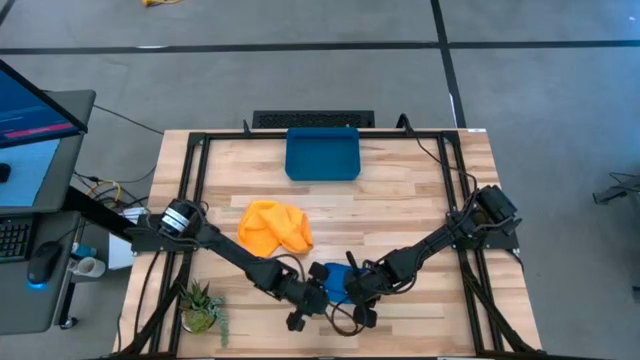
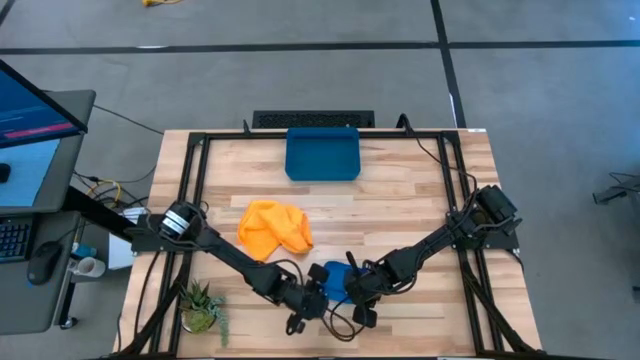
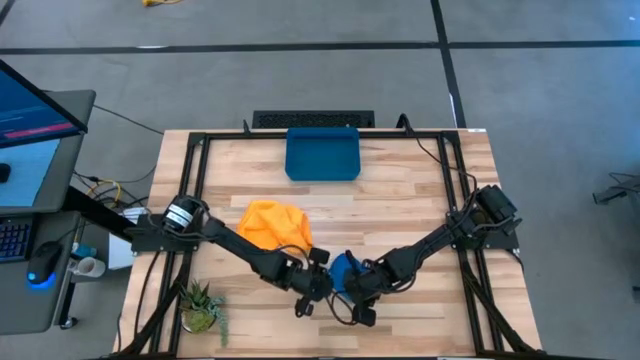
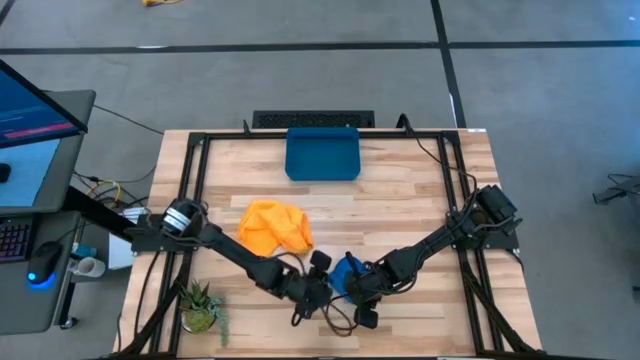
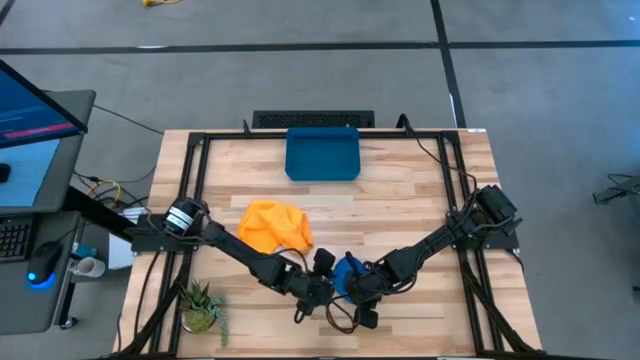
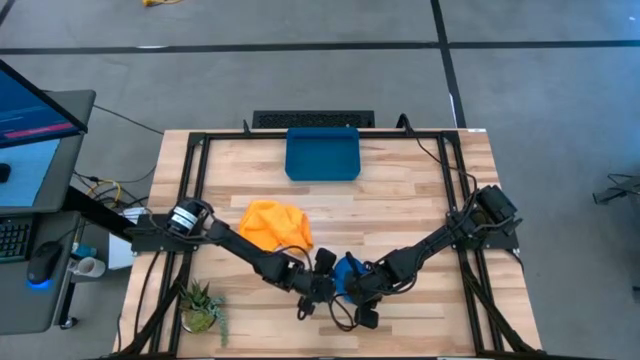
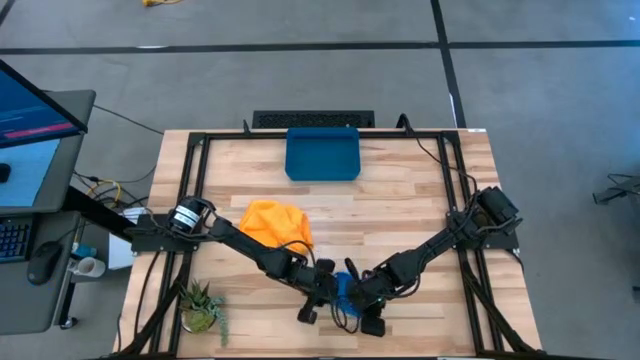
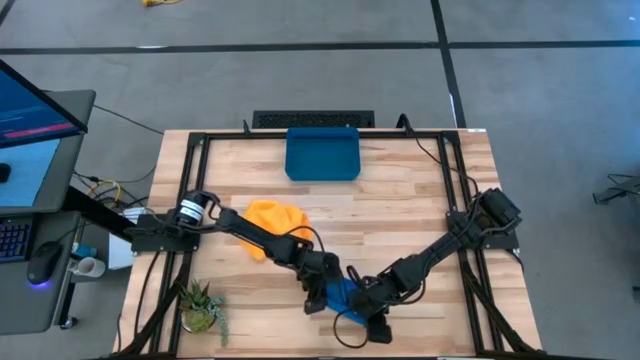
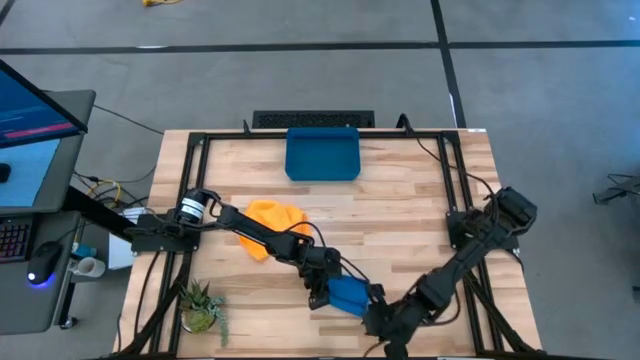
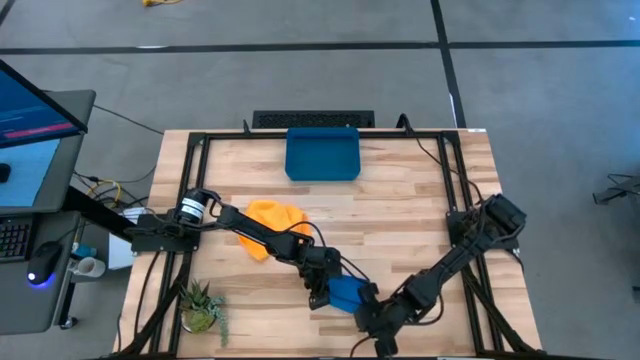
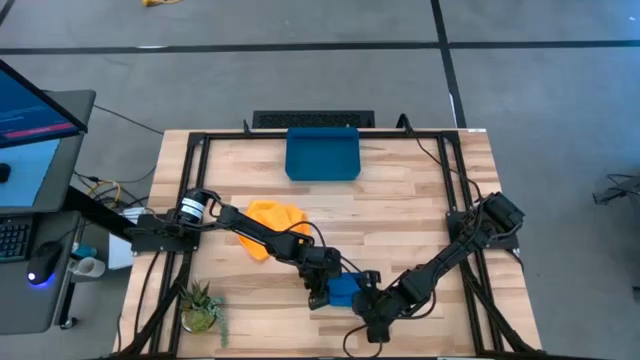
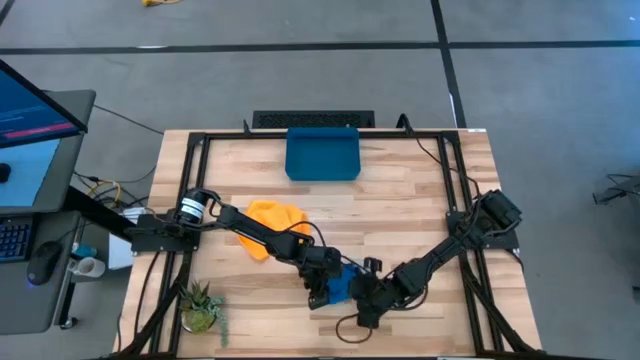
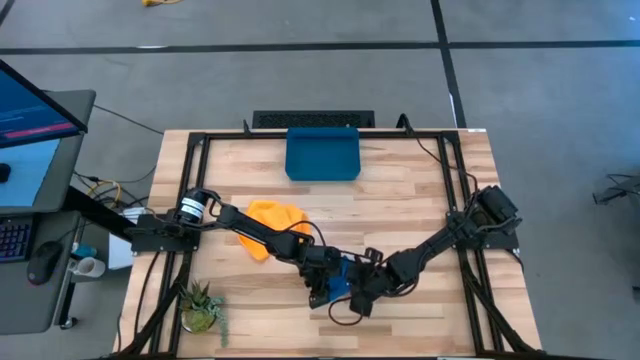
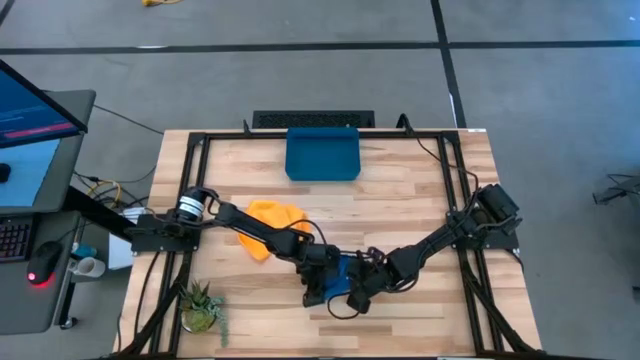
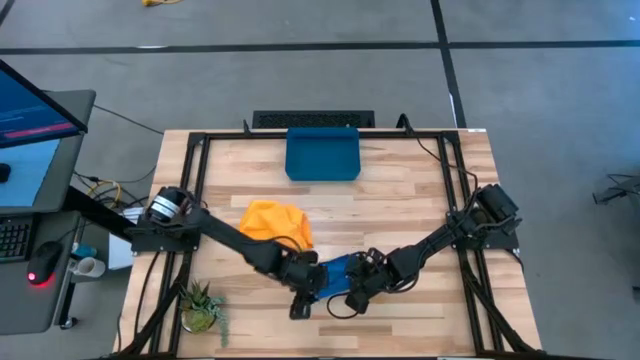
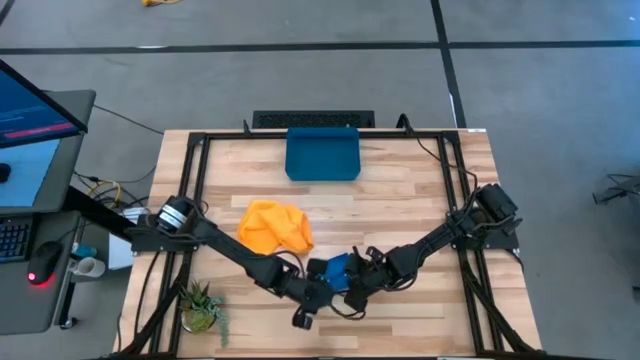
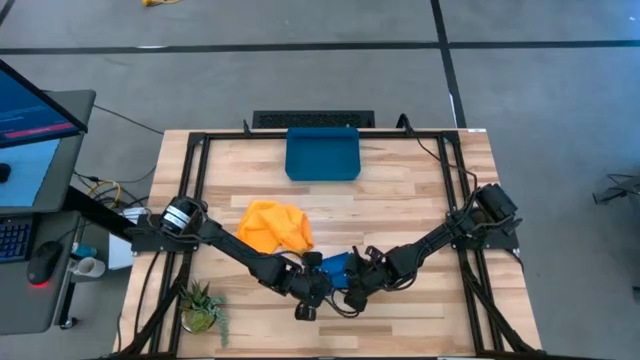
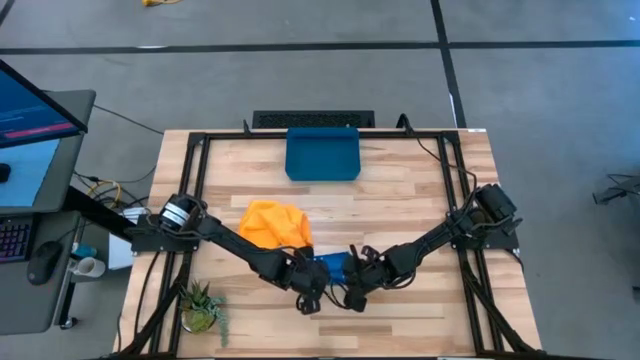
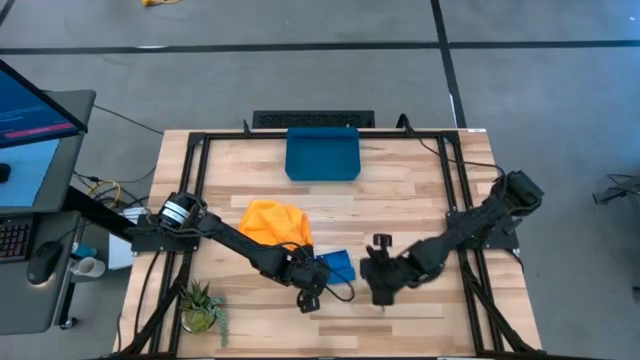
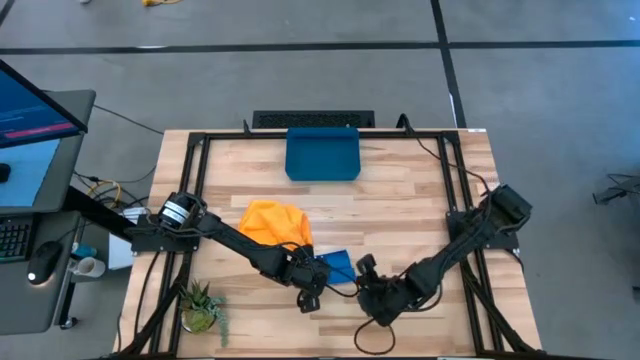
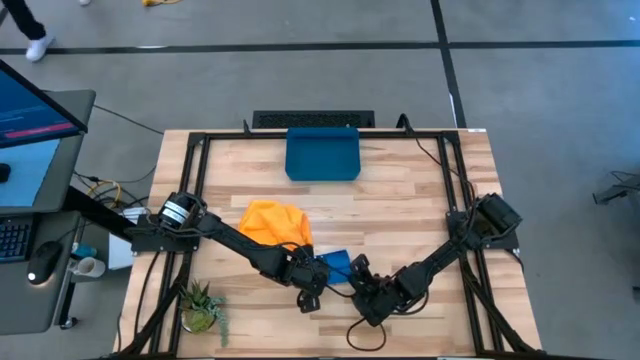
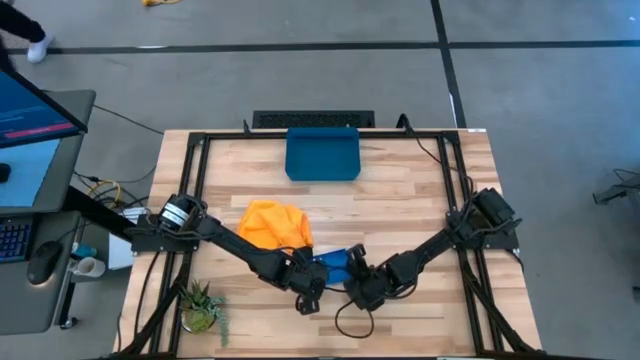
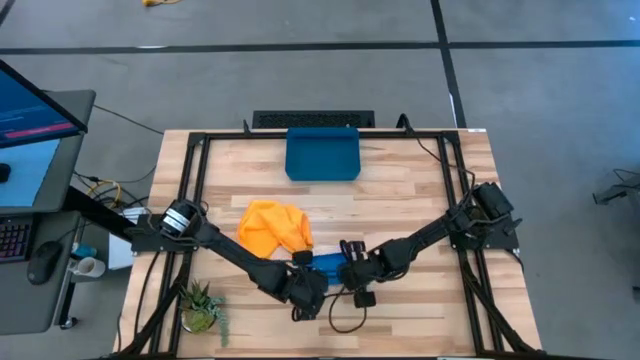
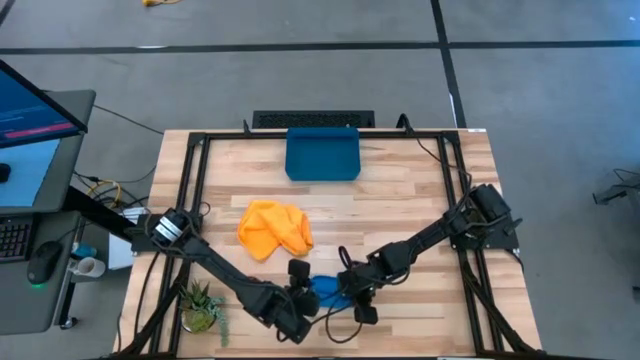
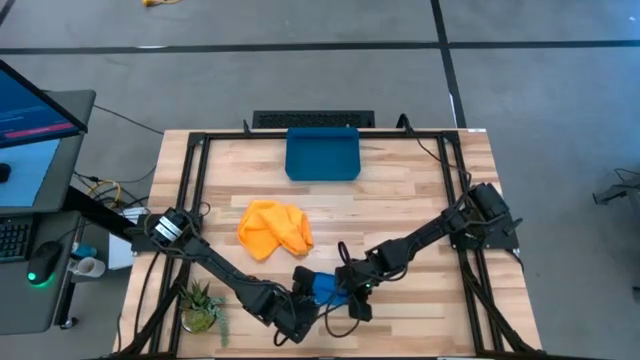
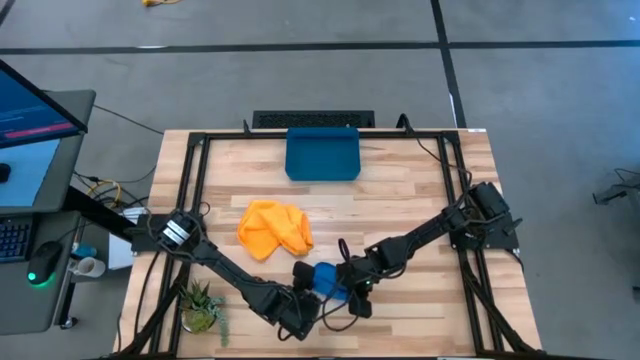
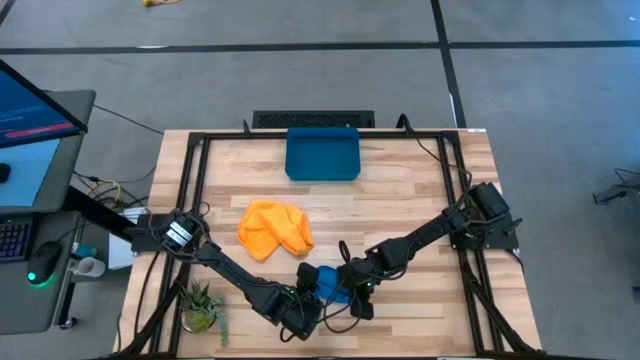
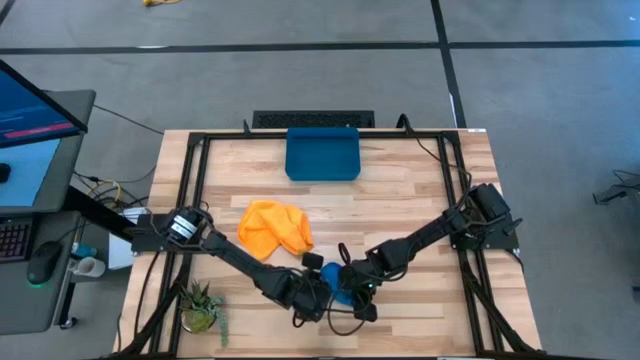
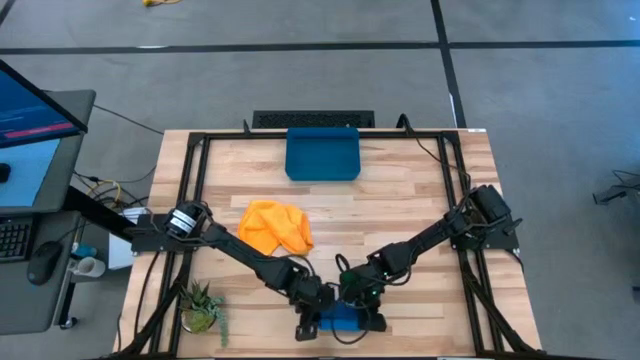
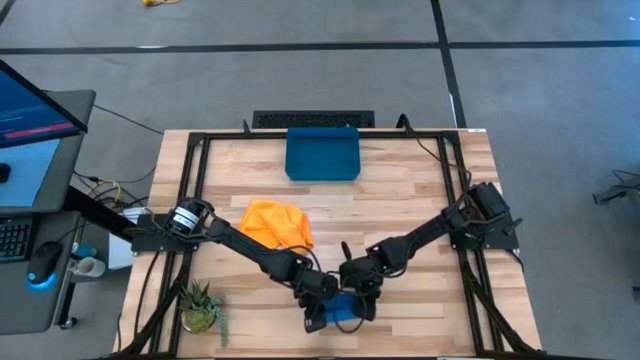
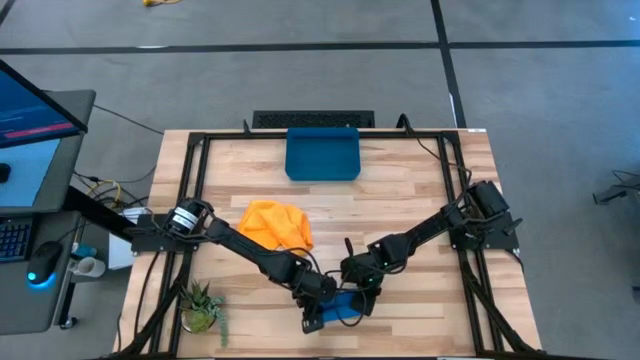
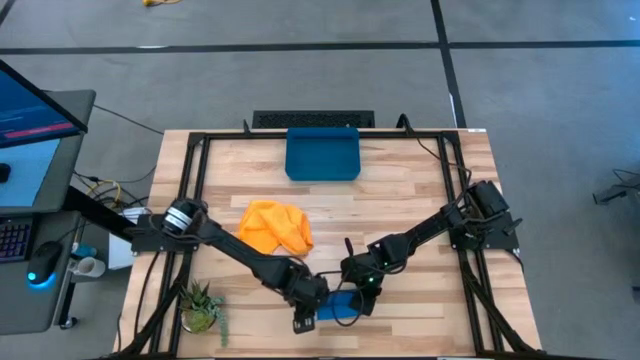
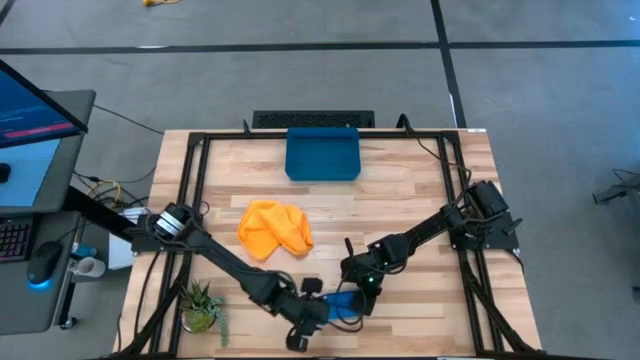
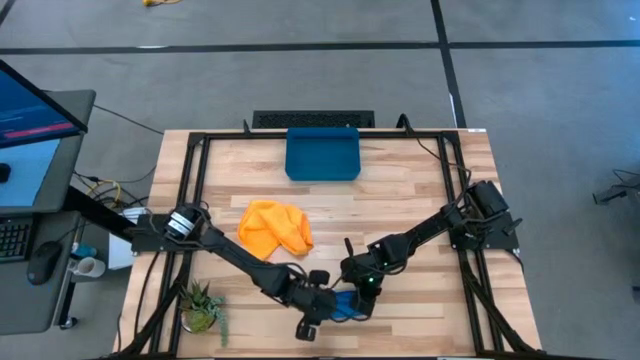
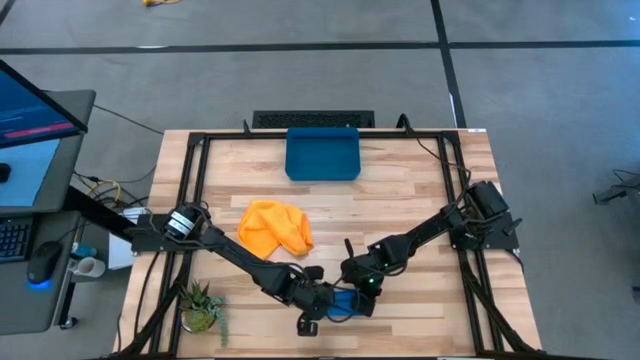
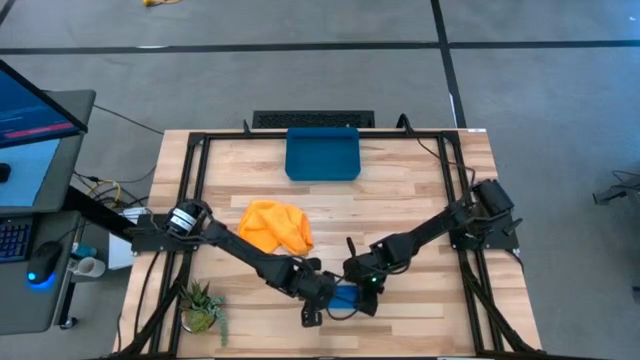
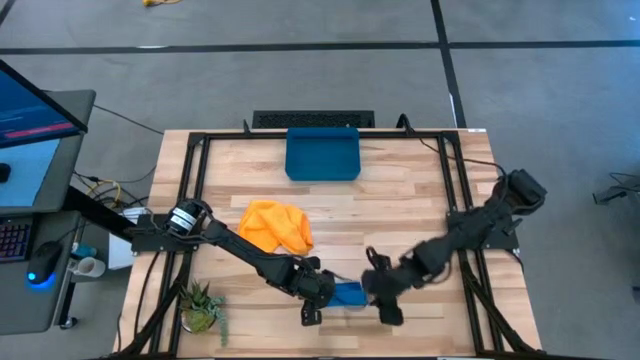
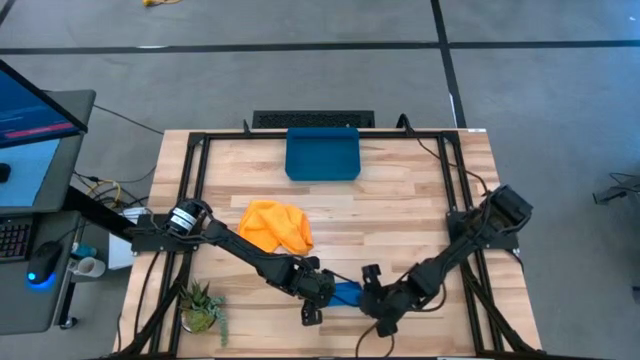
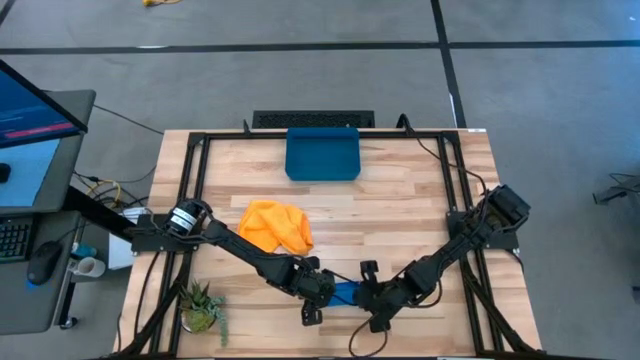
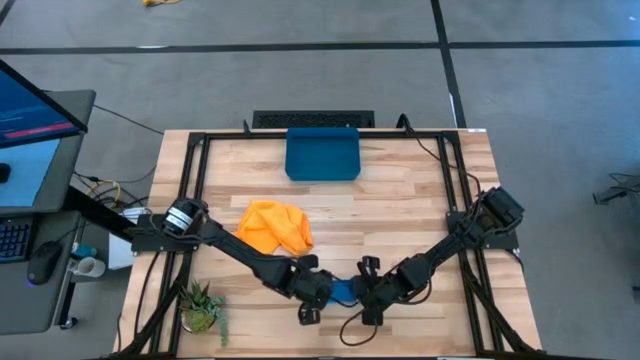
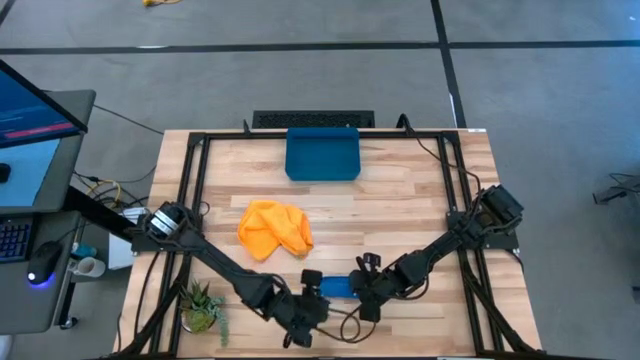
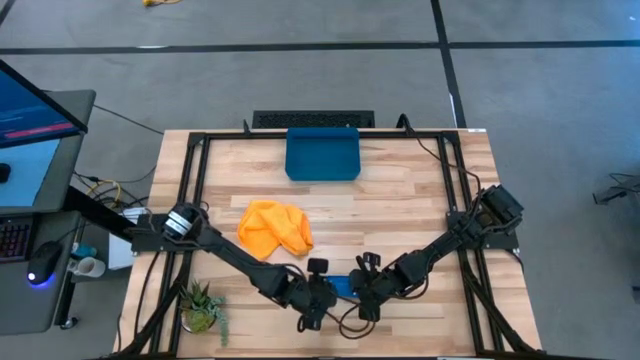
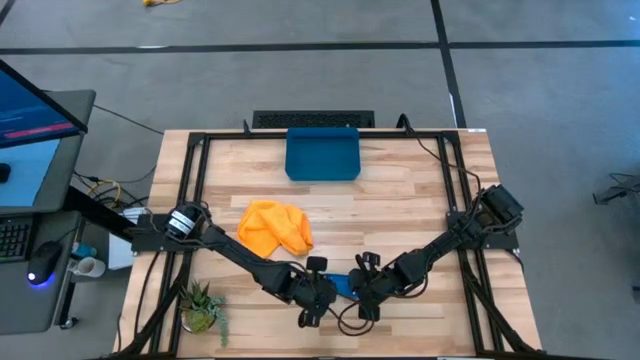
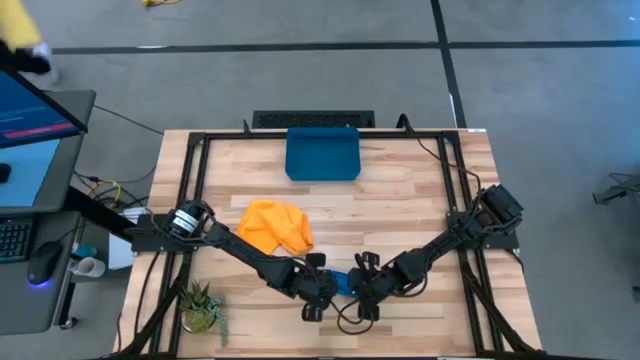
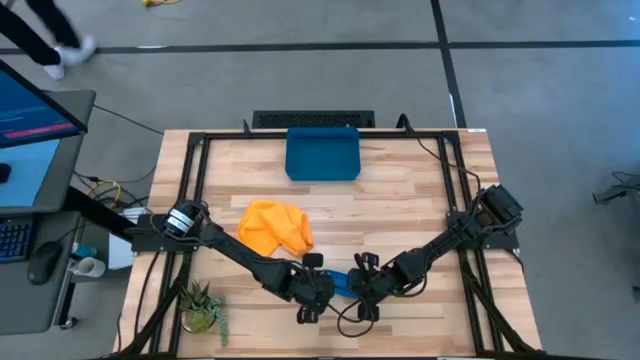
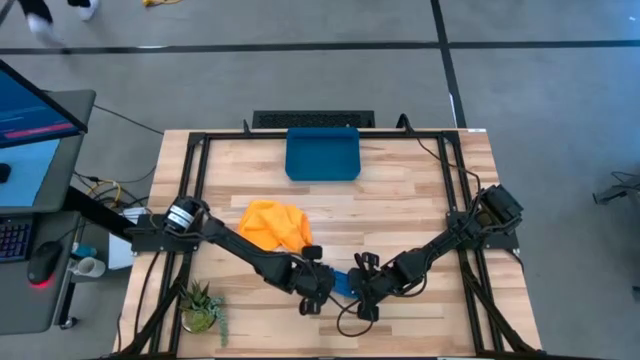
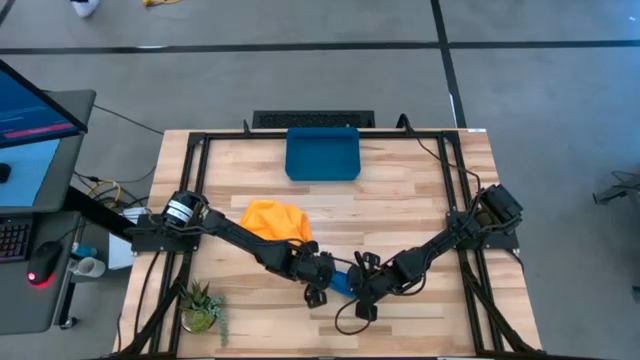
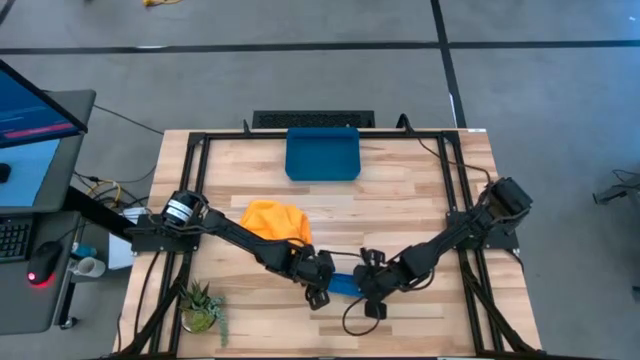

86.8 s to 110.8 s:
Task: Roll microfiber towels into tight, uniform cylinder then place into a basket
Roll the blue microfiber towel
